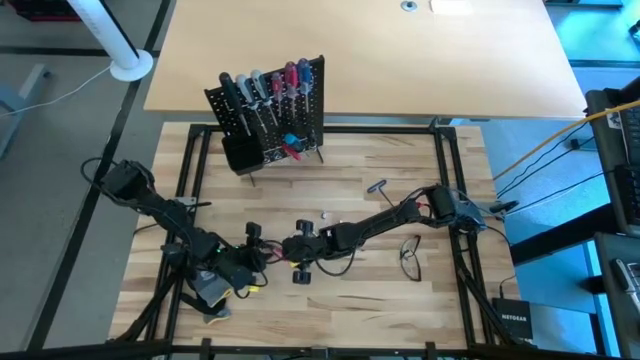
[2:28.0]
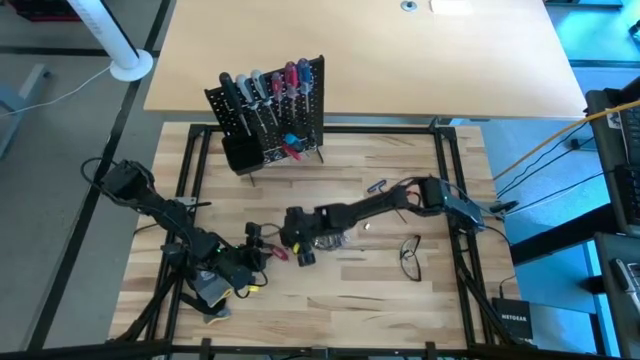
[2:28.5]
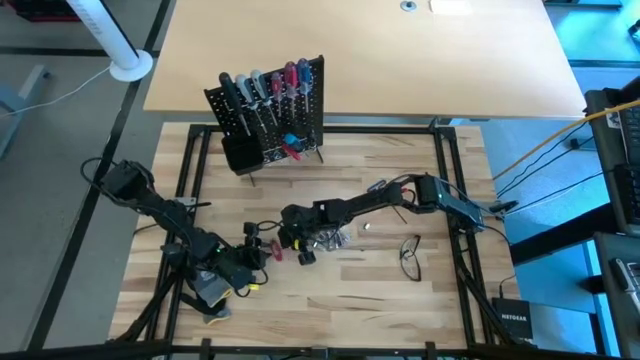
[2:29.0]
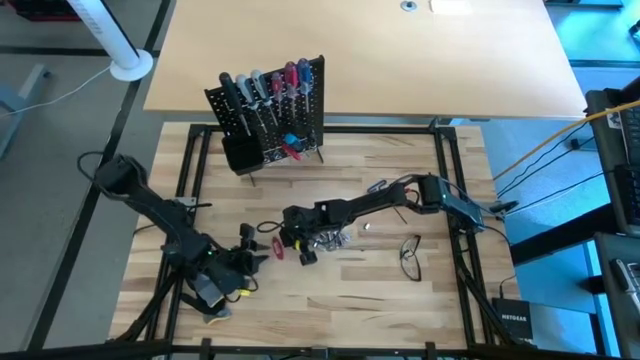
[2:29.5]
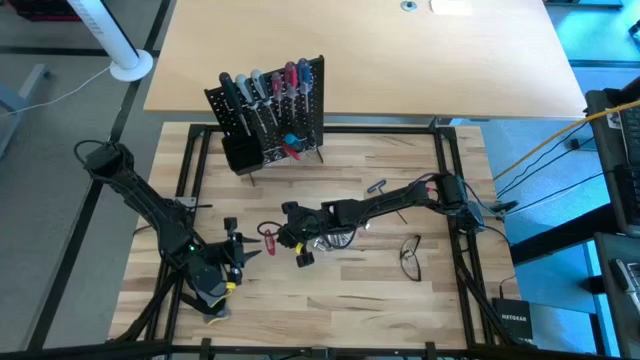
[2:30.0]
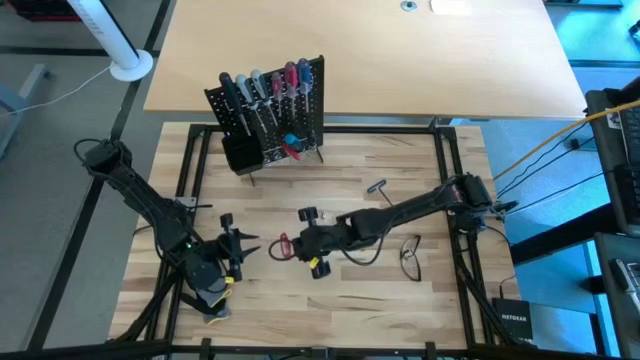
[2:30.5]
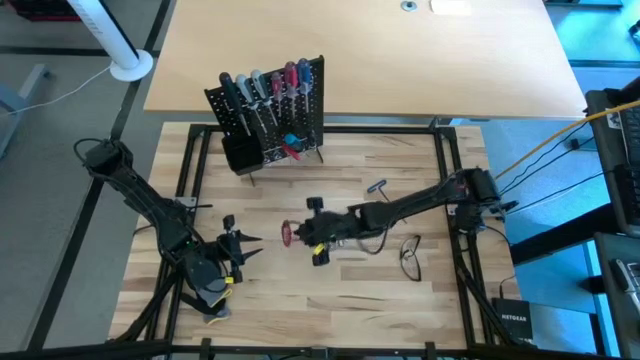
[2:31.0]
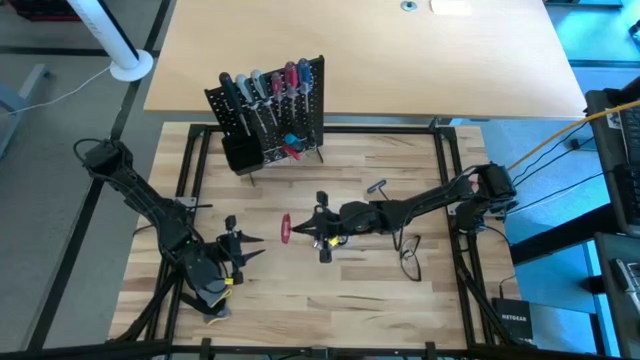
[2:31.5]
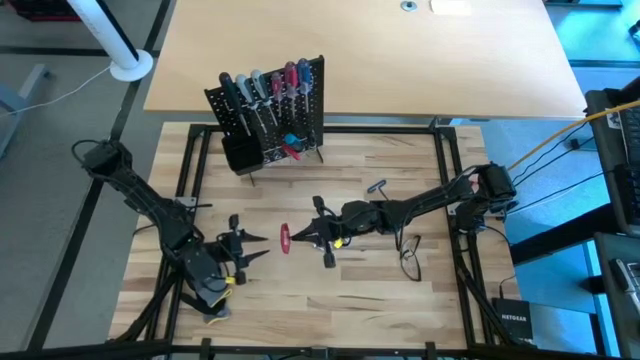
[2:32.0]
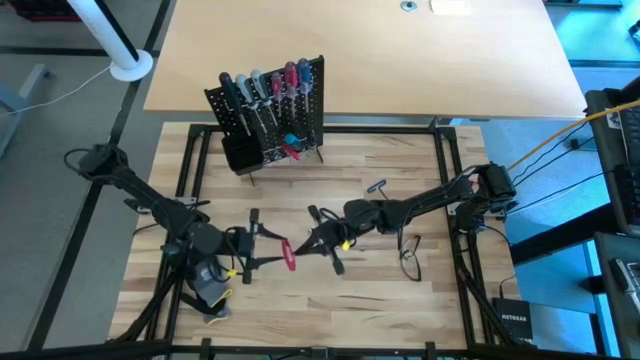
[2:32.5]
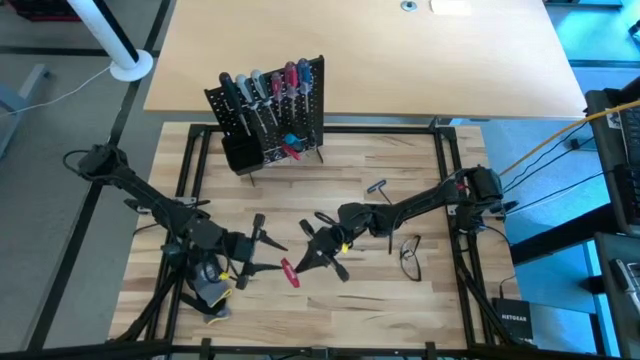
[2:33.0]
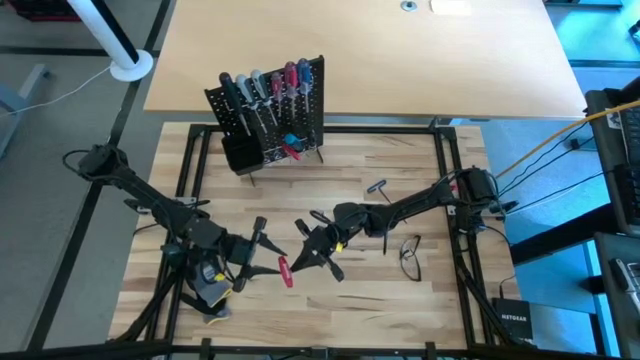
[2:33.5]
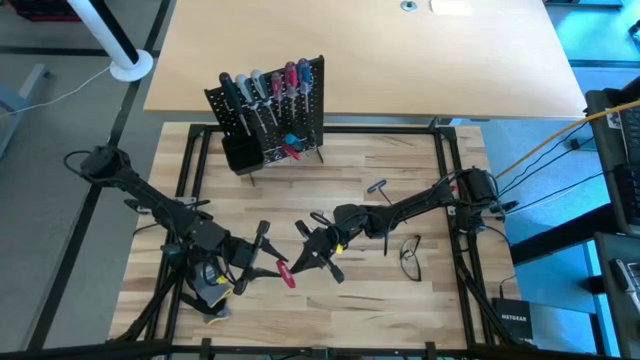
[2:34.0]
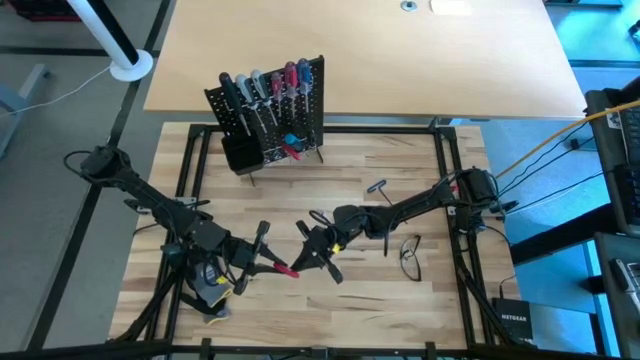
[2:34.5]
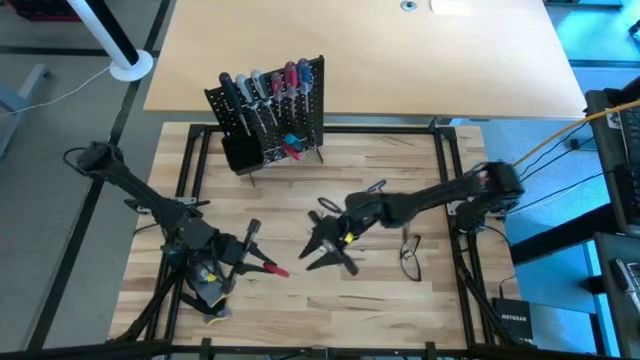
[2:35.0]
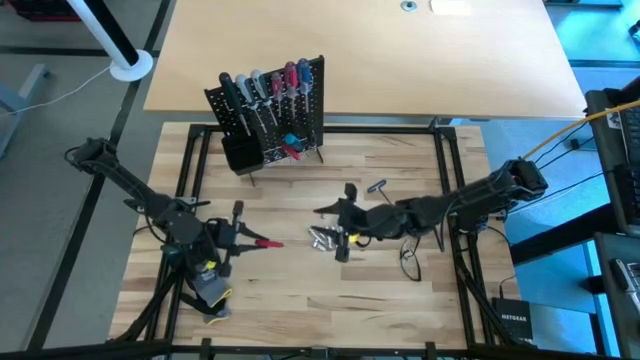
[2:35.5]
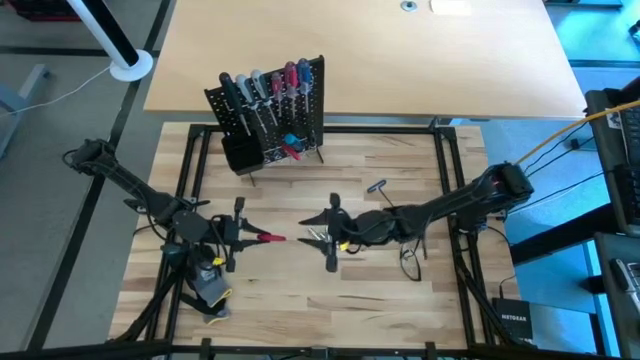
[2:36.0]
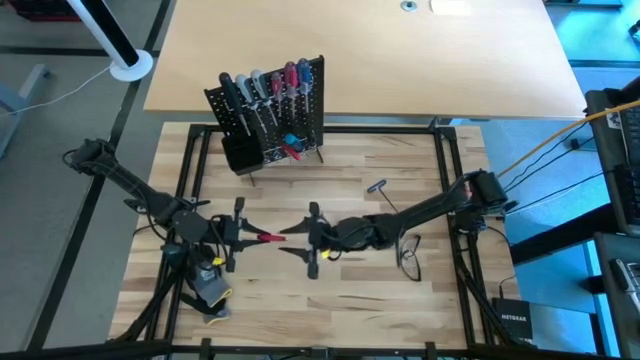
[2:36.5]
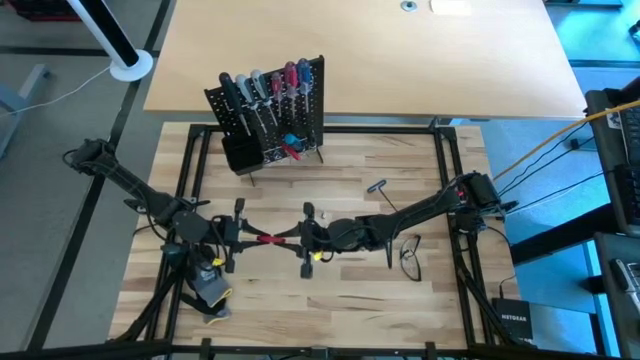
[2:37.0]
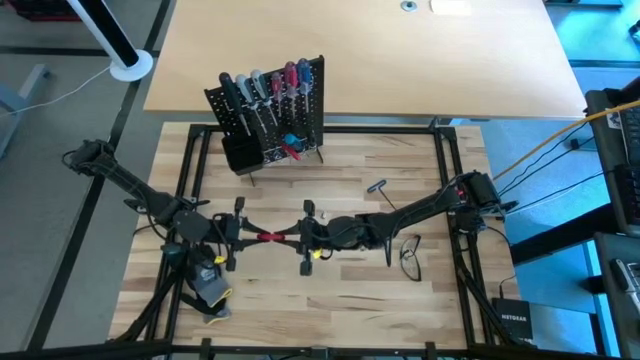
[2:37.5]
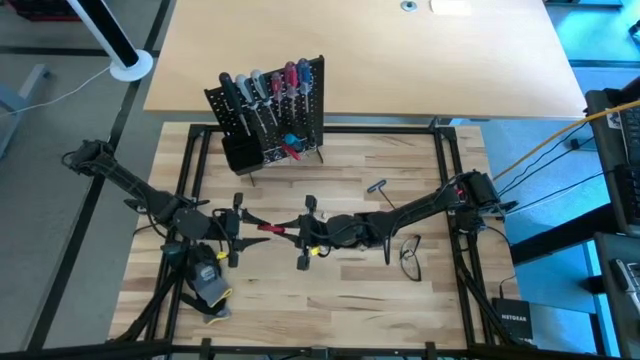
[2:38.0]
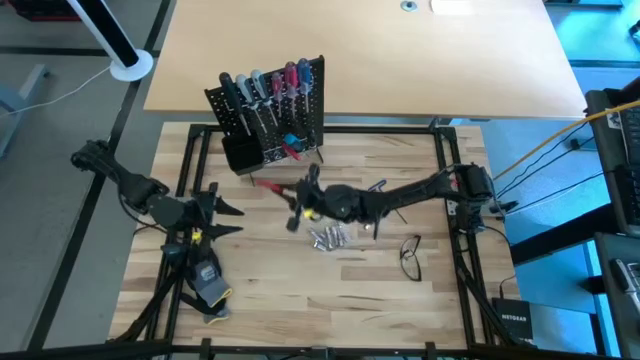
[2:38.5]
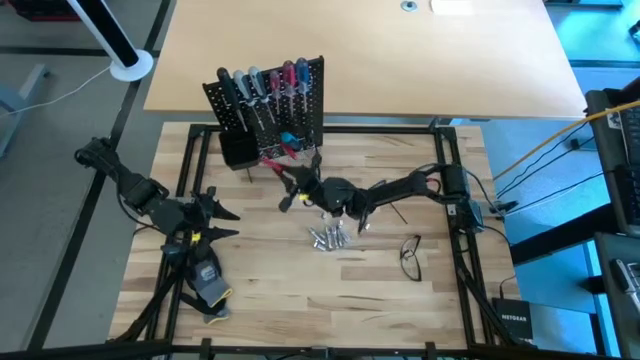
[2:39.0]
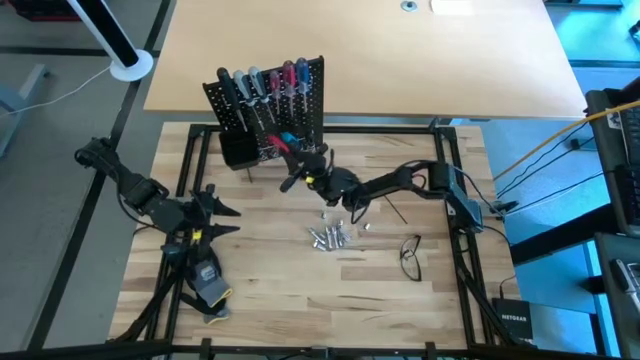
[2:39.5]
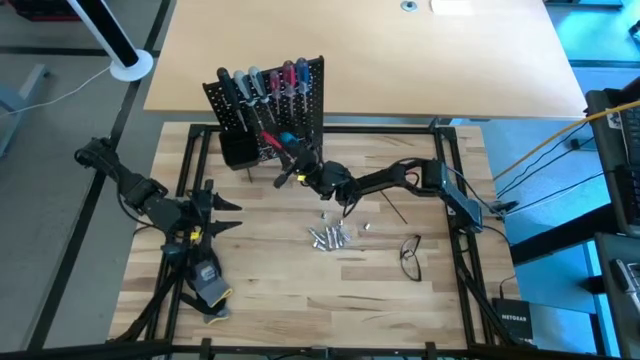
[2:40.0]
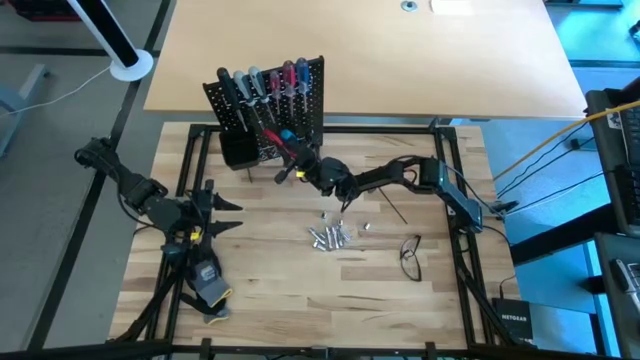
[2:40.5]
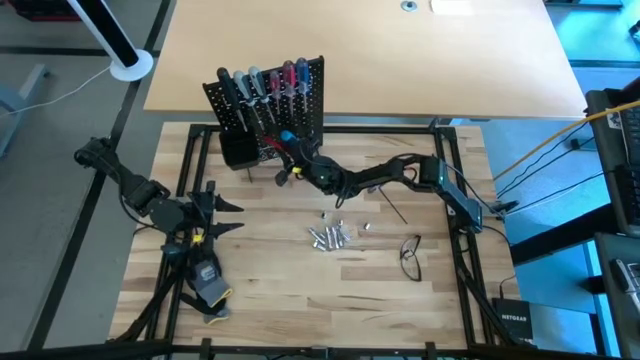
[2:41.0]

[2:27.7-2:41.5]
Task: Hang tools onto peg board
Hang the red allen wrench onto the peg board

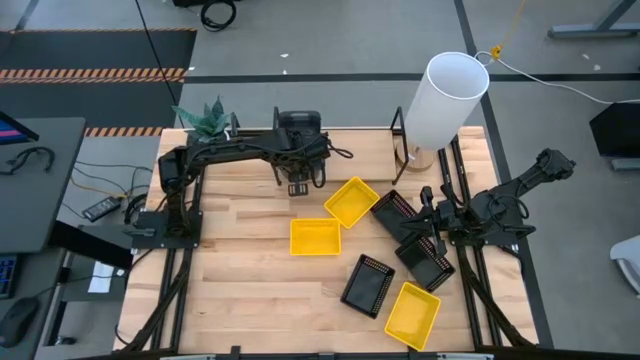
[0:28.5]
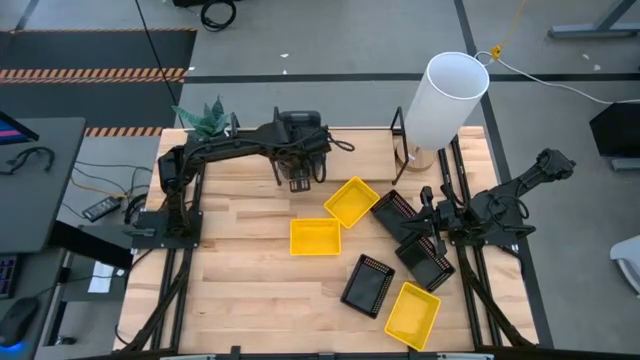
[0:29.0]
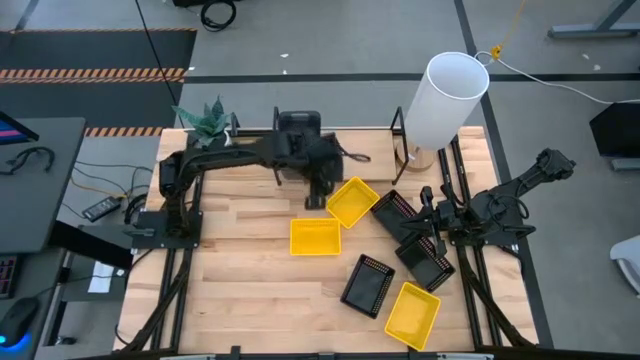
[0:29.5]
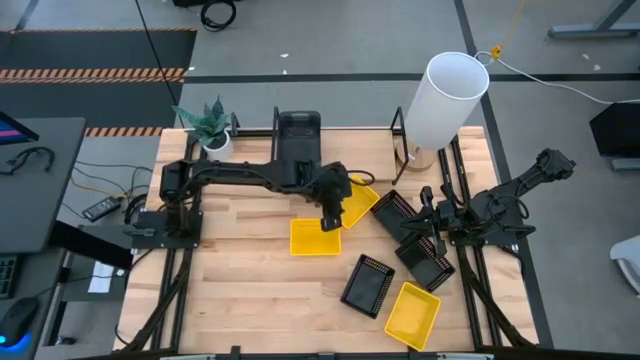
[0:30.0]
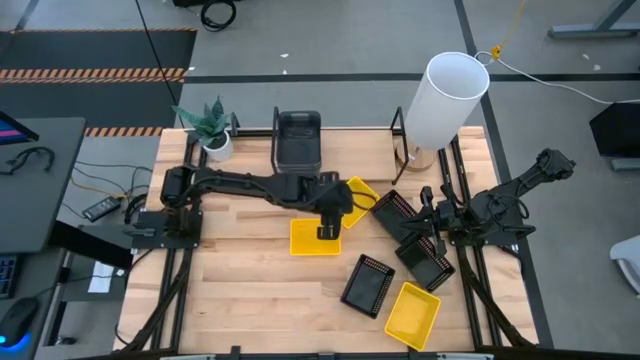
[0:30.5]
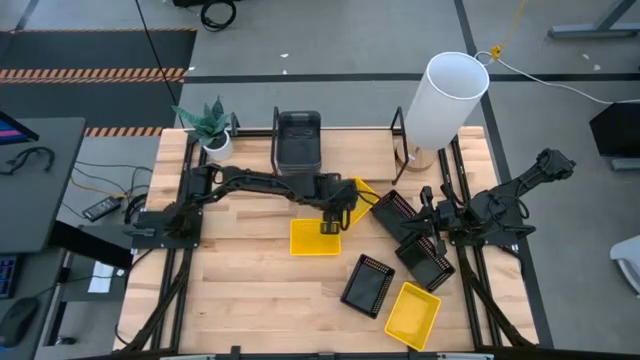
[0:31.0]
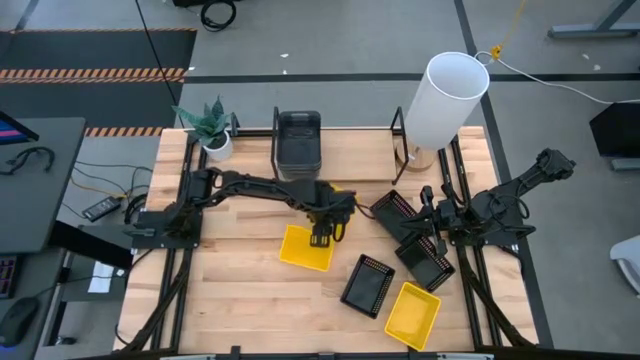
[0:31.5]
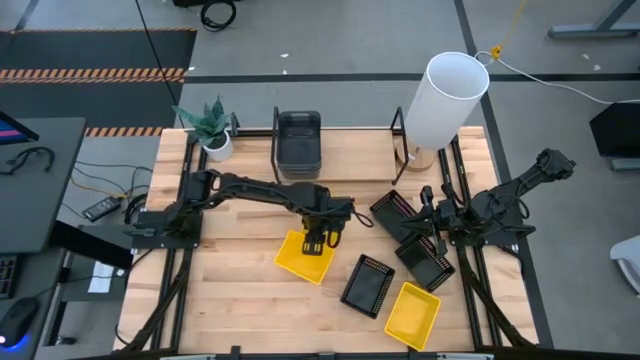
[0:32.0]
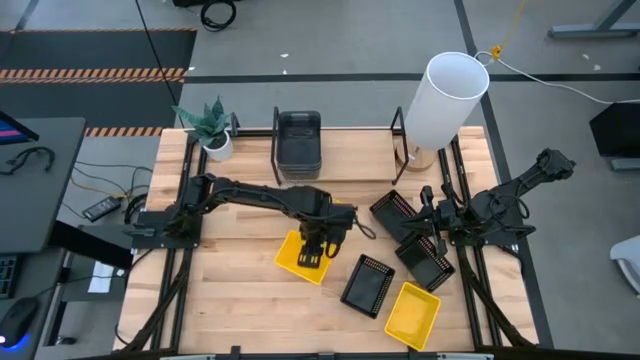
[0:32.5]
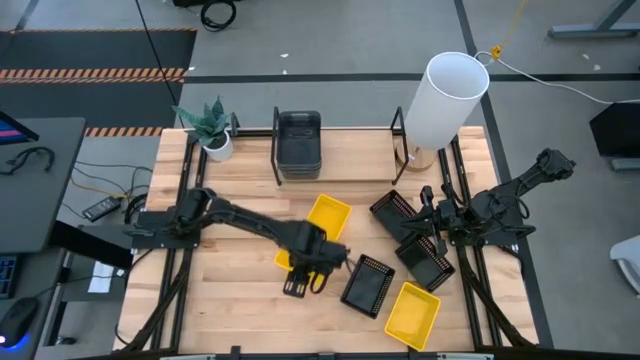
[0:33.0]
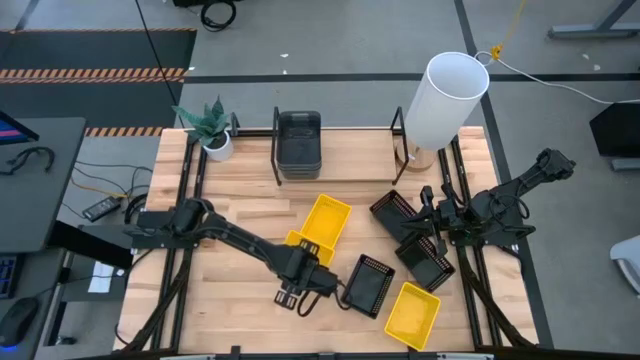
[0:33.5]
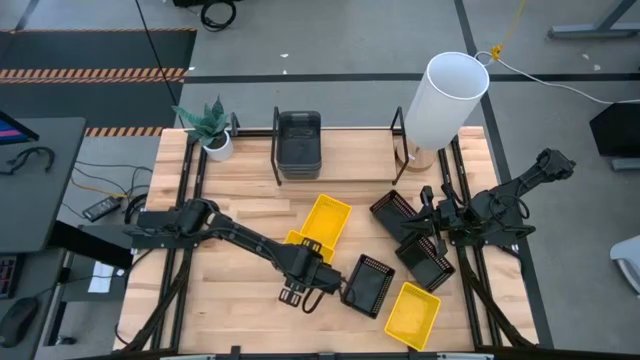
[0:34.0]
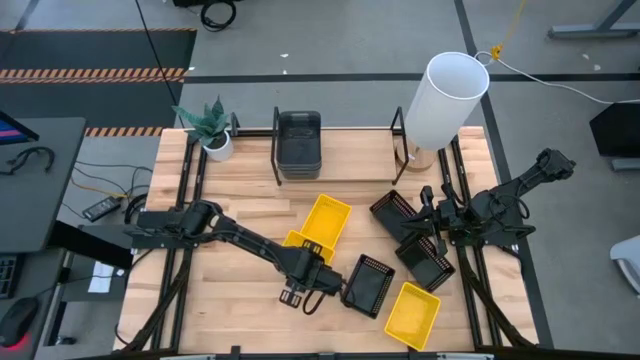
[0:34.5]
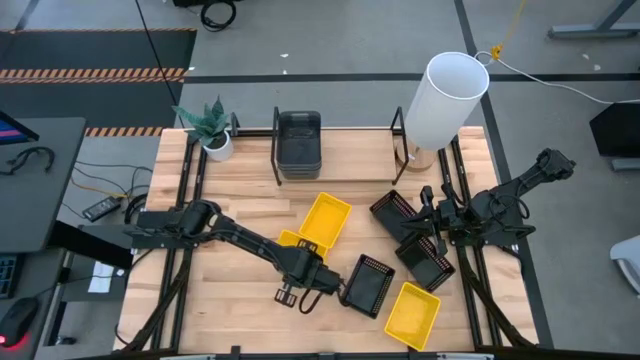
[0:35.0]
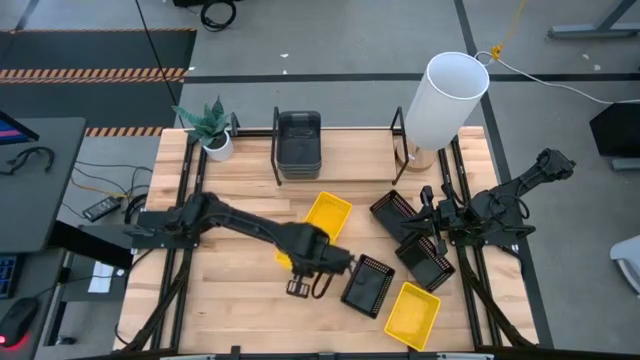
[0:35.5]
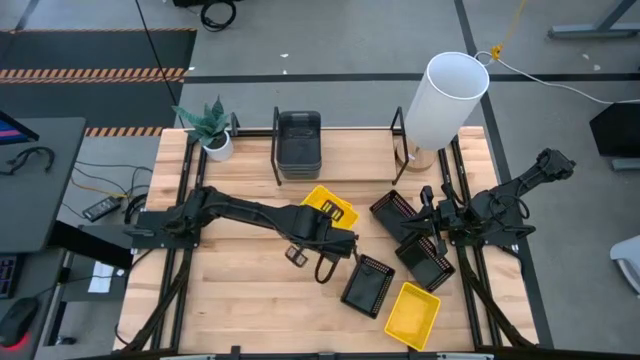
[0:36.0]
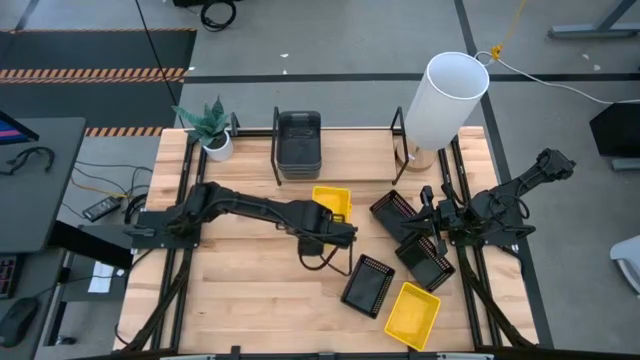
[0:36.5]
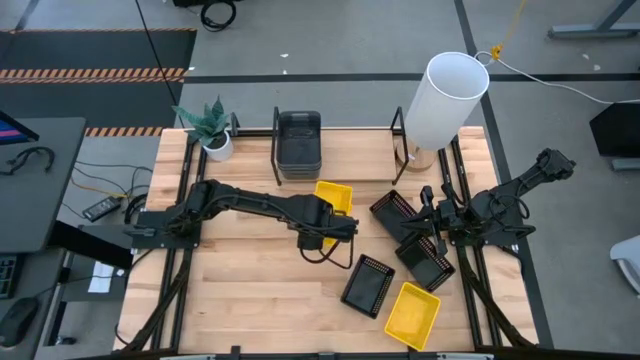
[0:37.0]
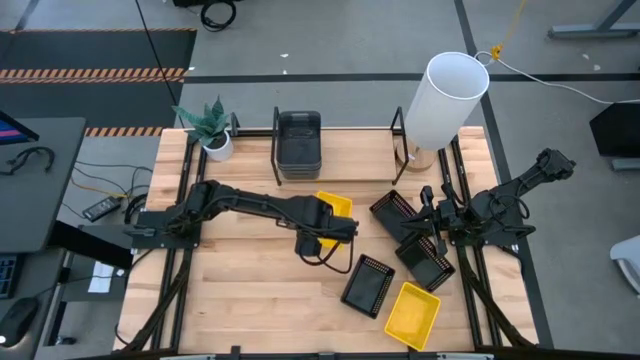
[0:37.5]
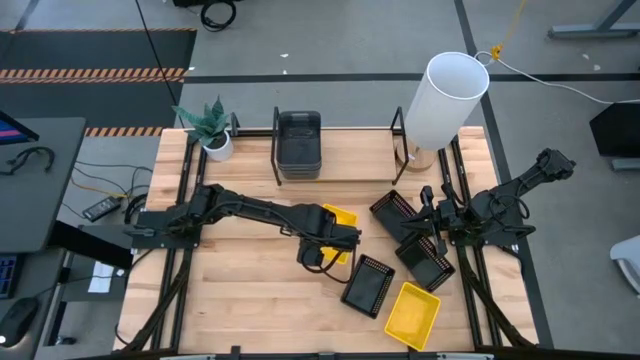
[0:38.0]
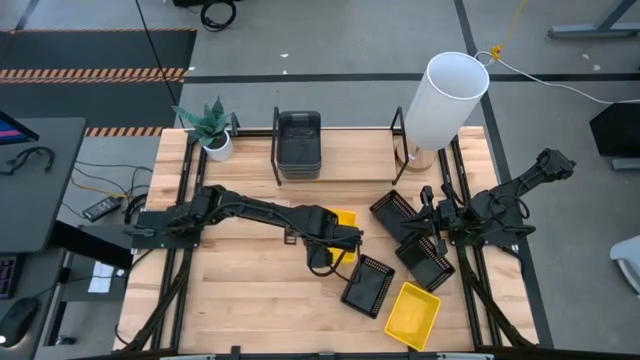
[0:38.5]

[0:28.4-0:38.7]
Task: Stack baskets on shelf by color
Stack the middle yellow basket on top of the top yellow basket
